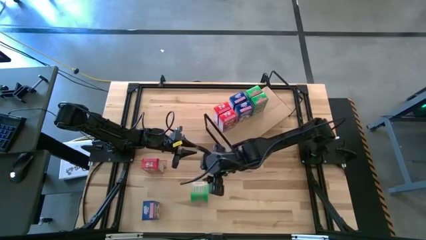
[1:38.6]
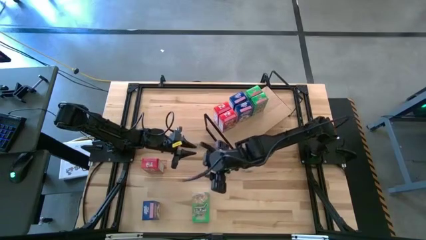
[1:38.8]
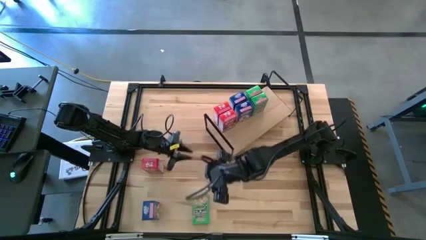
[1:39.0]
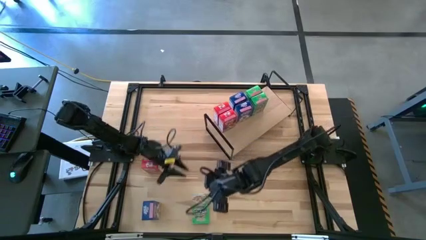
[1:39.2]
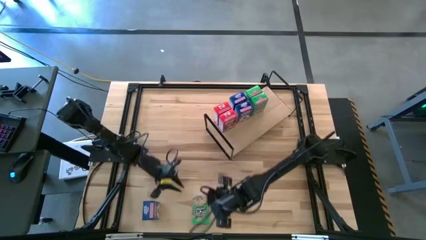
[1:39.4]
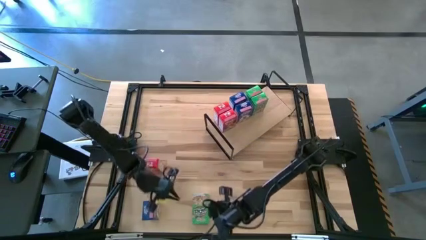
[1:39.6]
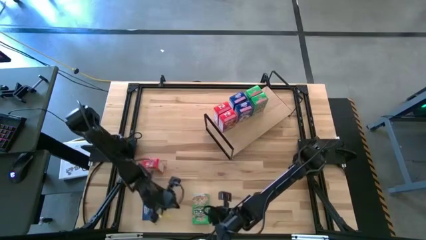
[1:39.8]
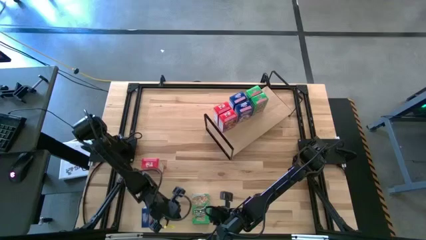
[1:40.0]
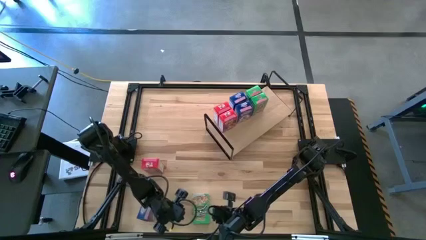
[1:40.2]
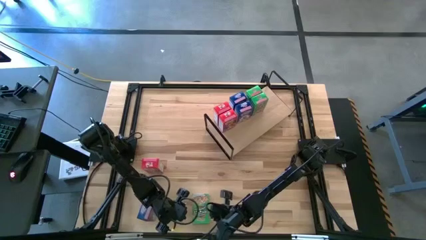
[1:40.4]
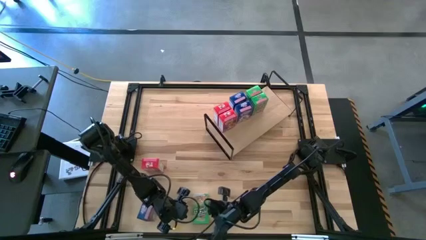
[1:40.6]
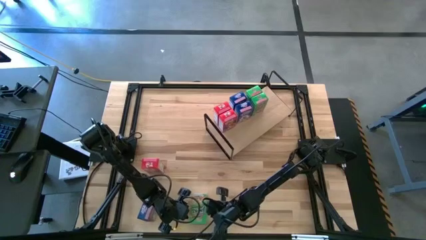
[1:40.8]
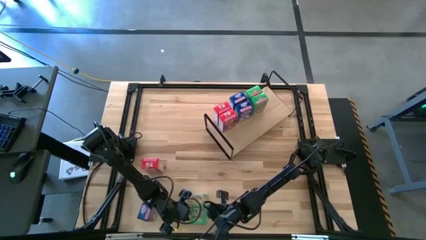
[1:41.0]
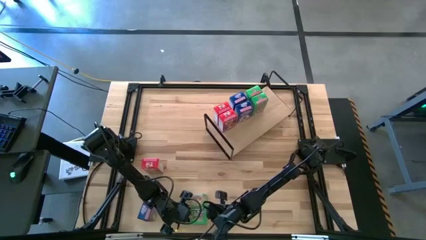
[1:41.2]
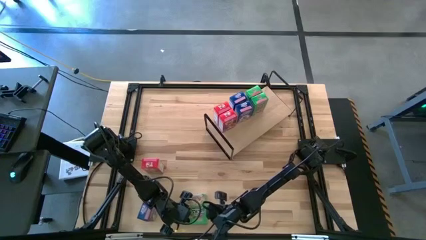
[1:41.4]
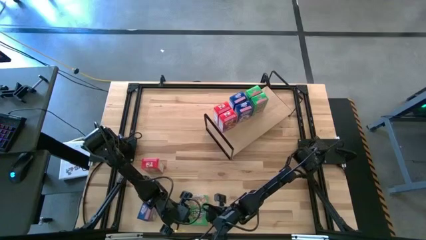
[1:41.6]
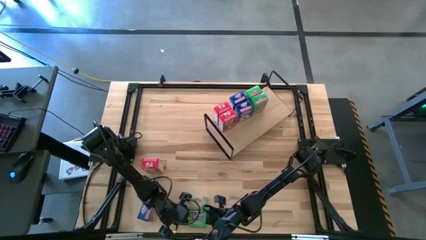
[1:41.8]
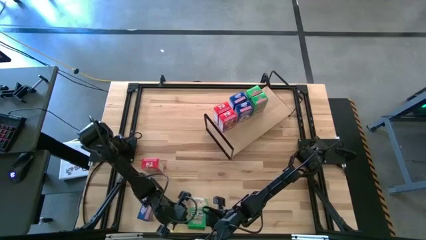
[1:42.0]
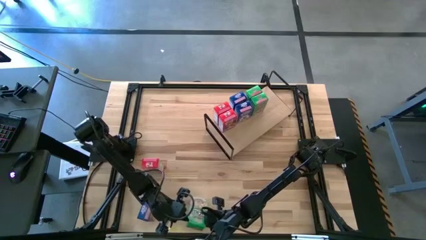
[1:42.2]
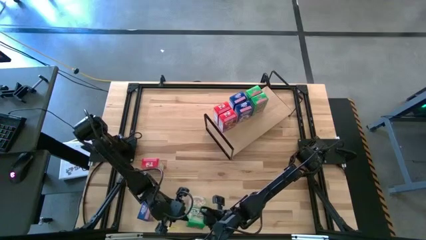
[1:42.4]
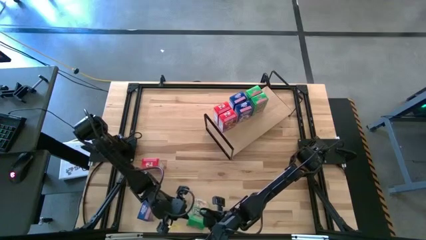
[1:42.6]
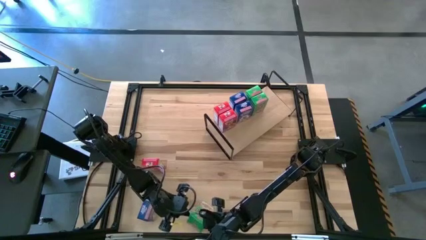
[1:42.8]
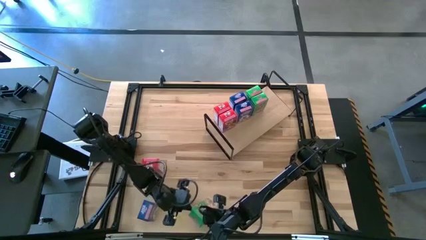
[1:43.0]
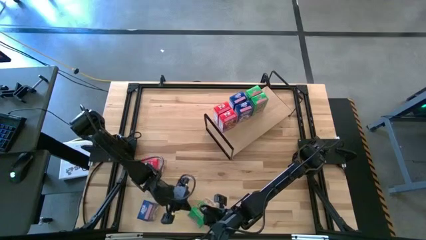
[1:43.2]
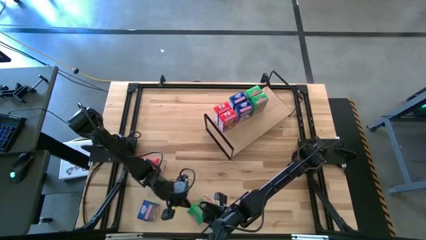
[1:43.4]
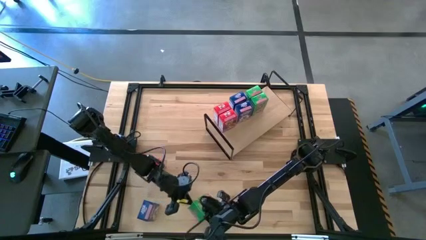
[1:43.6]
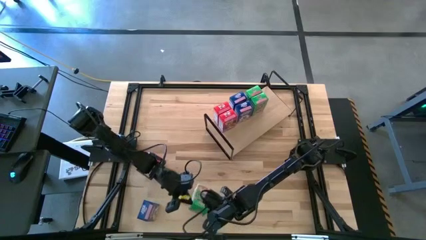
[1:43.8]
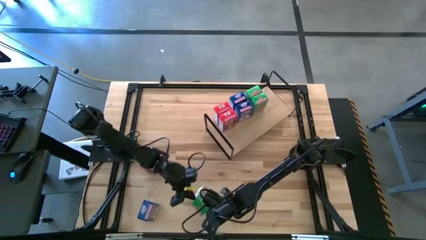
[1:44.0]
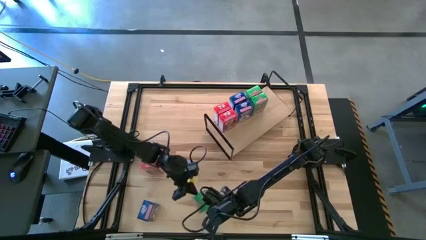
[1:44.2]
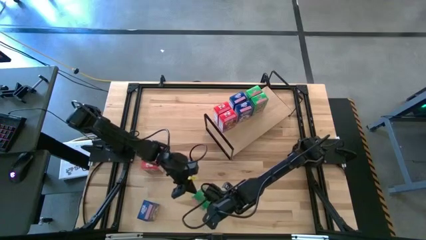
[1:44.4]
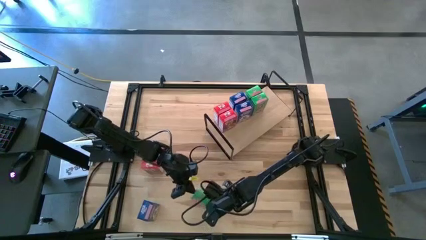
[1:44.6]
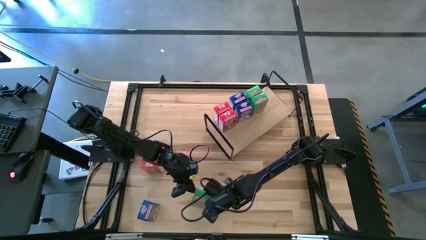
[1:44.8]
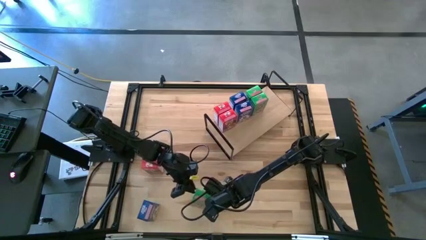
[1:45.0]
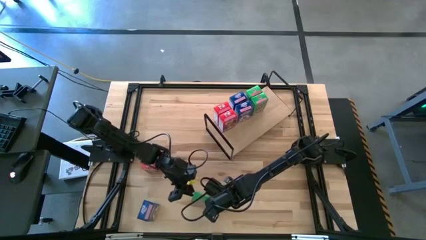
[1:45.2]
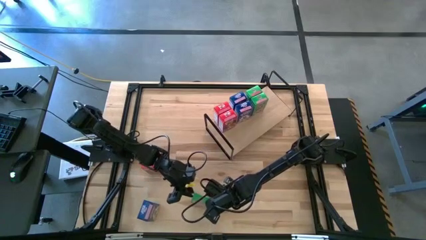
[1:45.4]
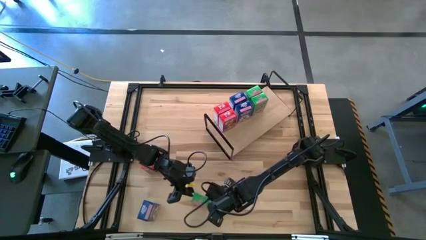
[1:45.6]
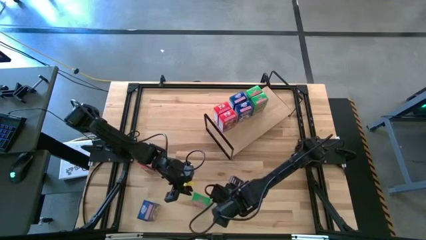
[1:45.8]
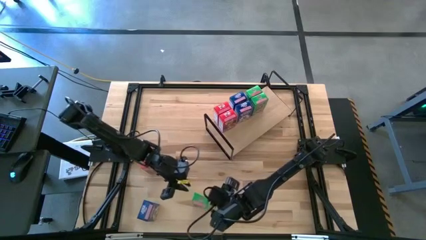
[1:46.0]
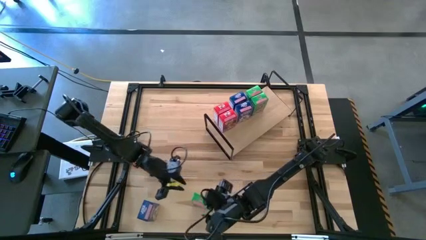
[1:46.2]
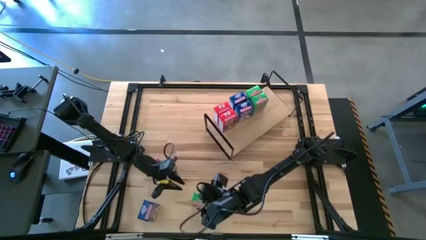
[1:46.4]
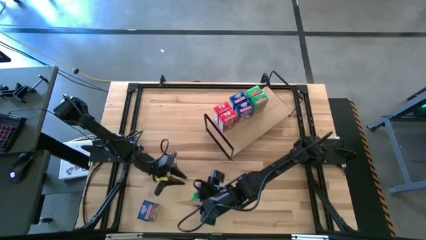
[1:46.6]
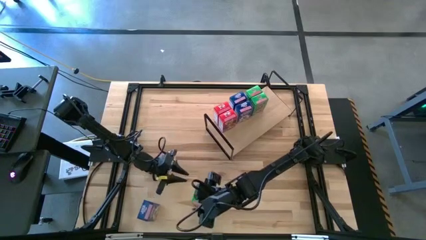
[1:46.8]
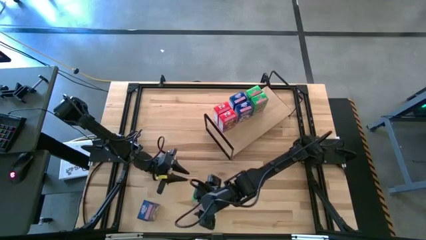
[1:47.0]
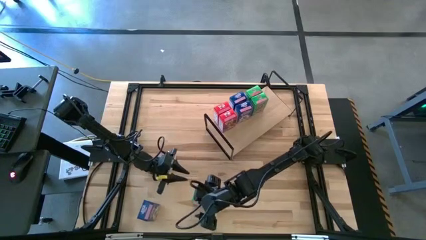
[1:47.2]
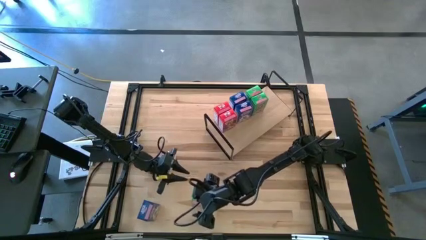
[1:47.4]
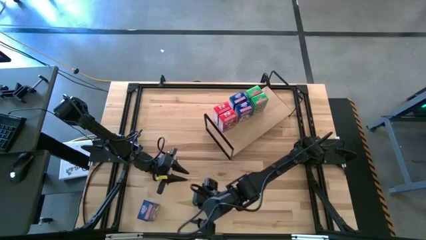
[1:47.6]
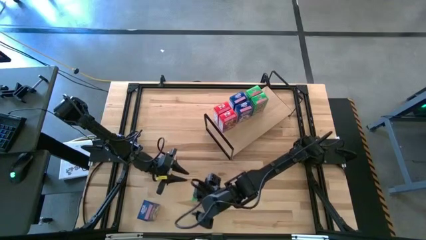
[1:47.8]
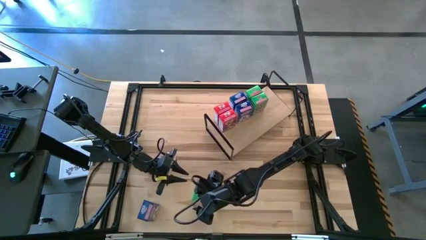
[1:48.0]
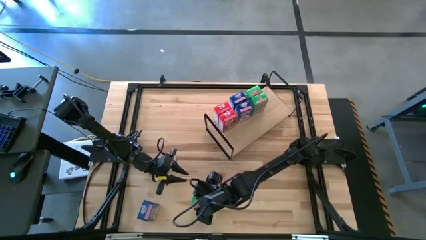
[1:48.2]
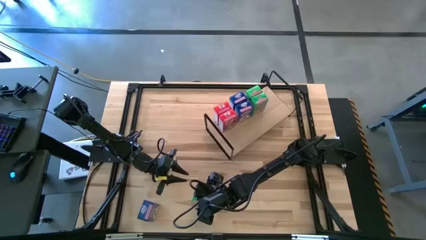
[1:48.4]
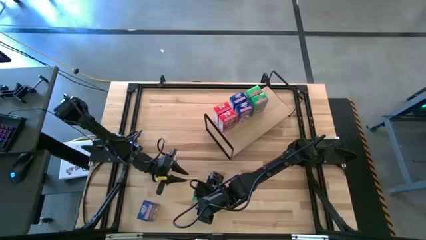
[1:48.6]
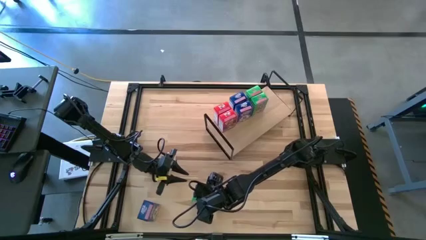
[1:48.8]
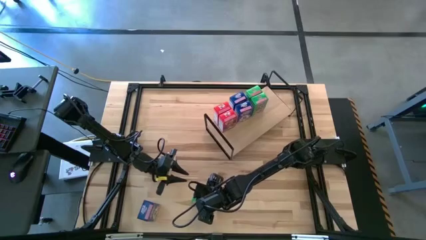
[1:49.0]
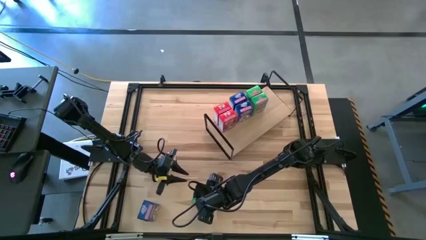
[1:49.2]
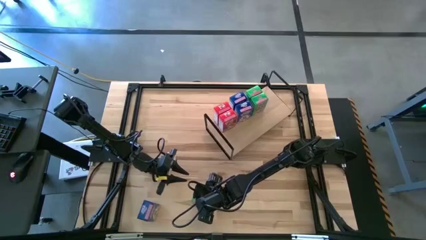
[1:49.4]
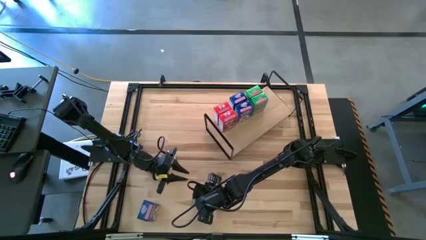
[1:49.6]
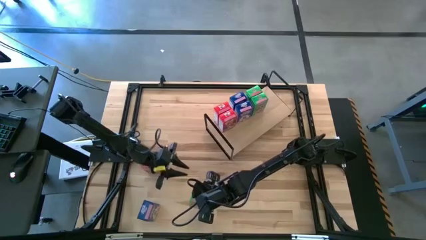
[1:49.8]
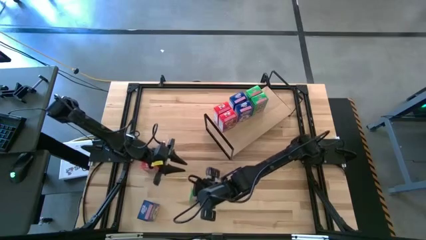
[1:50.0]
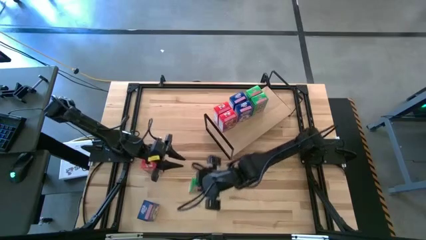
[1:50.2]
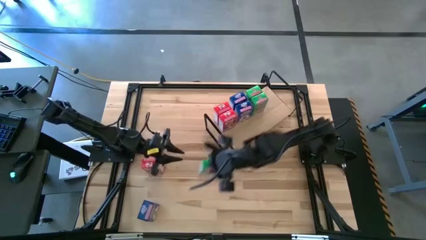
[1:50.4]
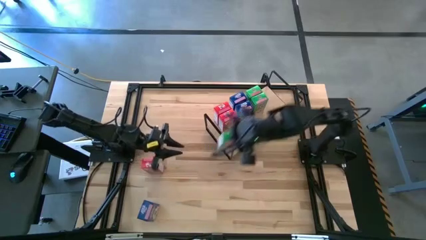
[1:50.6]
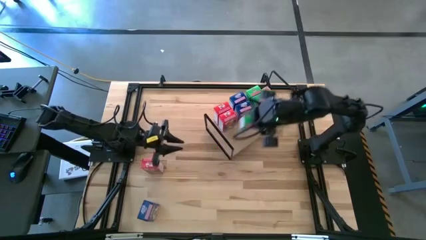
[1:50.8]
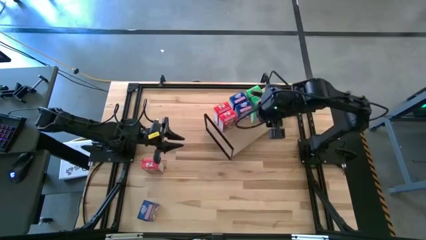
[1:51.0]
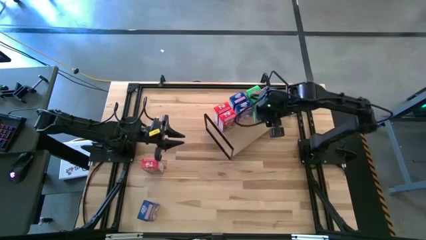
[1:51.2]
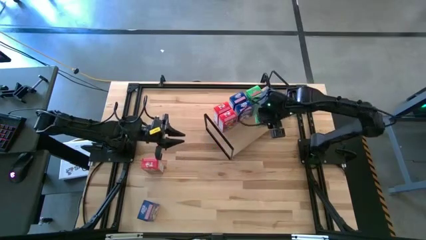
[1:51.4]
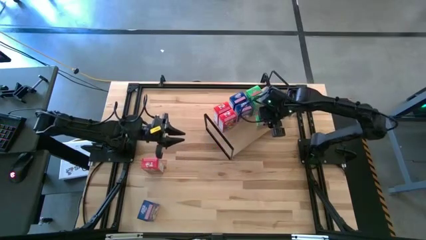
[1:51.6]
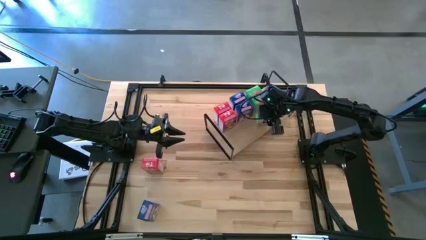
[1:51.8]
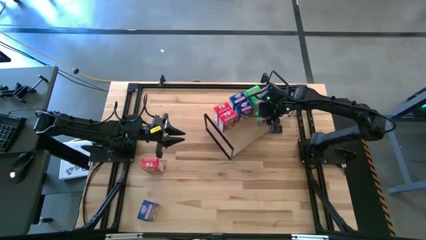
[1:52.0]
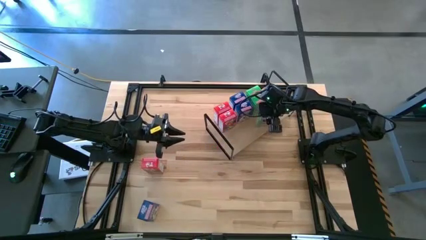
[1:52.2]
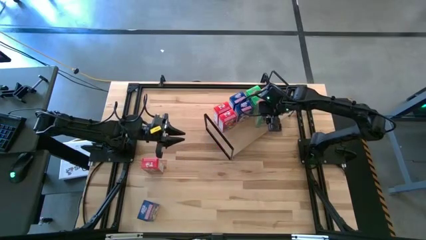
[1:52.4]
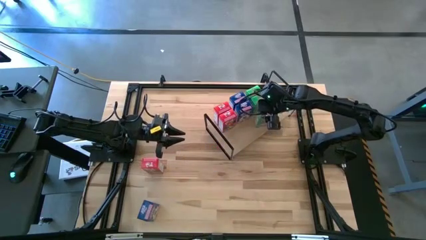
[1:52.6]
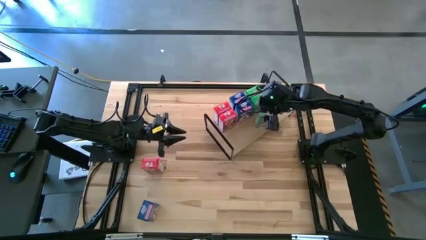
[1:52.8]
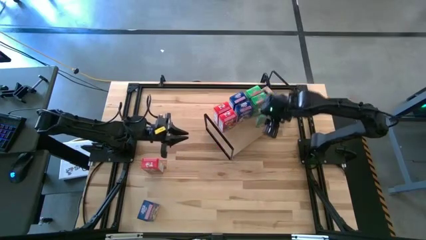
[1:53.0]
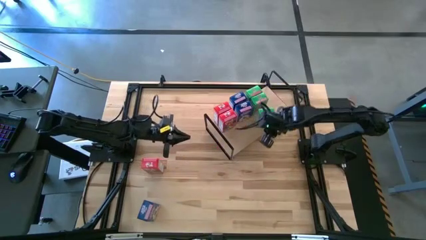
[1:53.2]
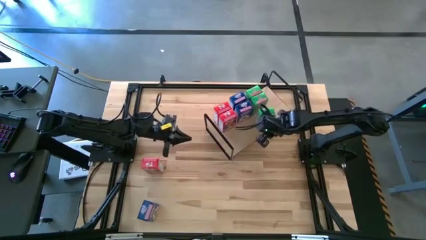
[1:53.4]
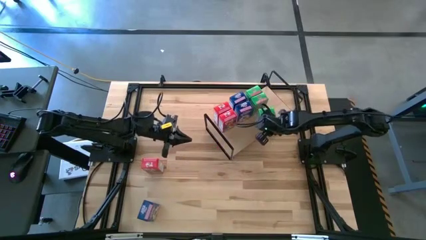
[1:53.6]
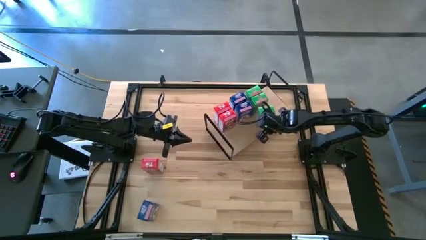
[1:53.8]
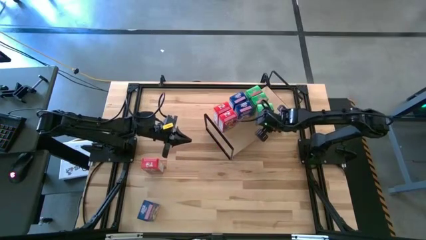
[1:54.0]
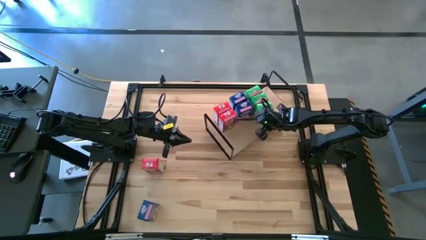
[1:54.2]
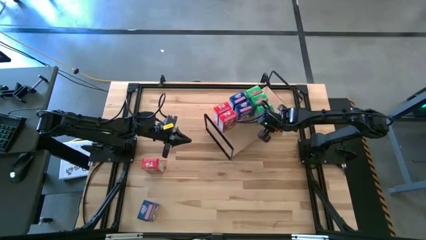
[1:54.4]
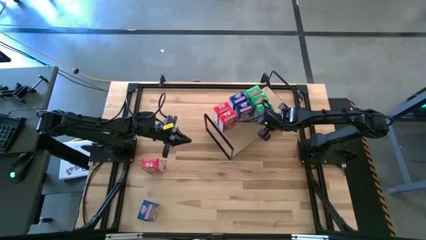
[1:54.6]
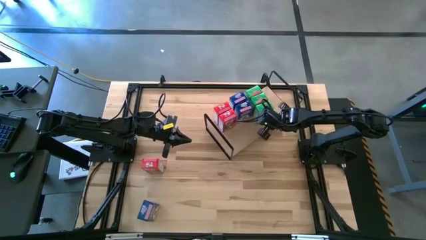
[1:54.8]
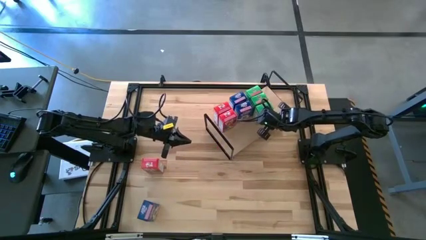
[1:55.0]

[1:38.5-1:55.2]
Task: Stack cereal on shelf
Put the green cereal box on the shelf aligned with the other green cereal boxes

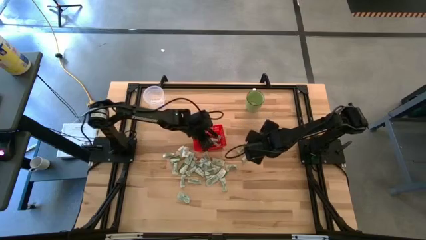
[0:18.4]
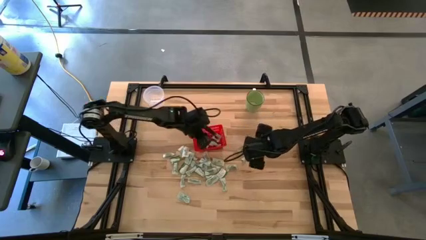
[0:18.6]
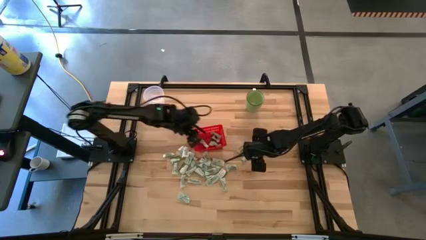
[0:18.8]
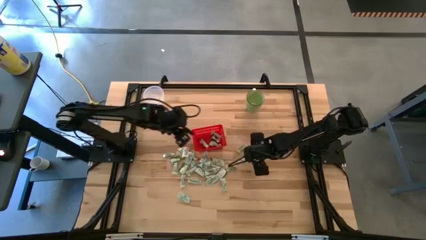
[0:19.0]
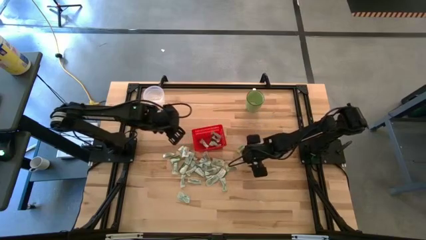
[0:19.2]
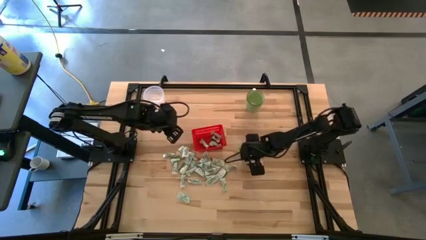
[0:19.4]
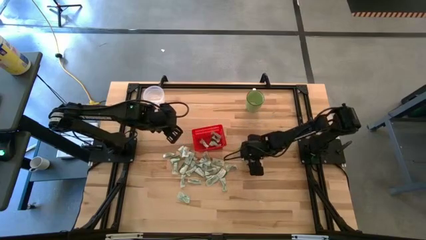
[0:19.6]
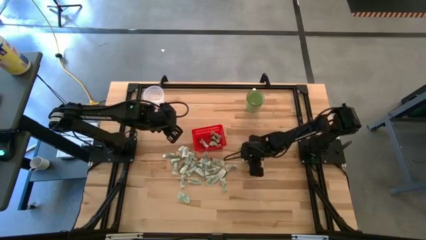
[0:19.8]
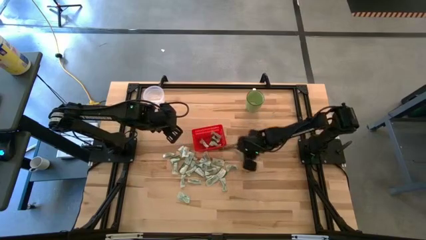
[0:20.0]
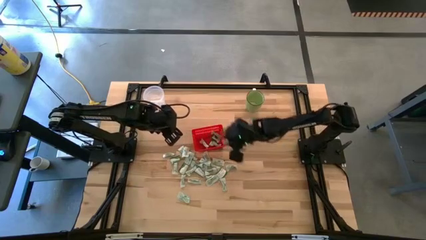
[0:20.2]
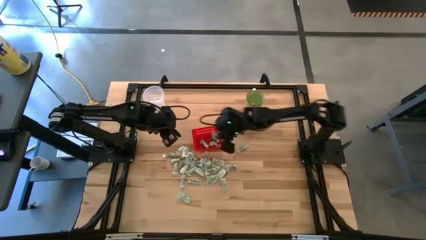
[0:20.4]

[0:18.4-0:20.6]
Task: Pick and place Stevia / Truvia into bins
Put the stevia packet into the red basket
